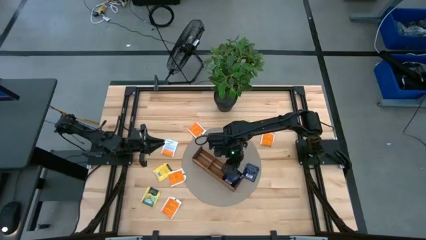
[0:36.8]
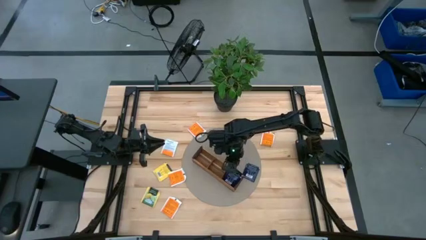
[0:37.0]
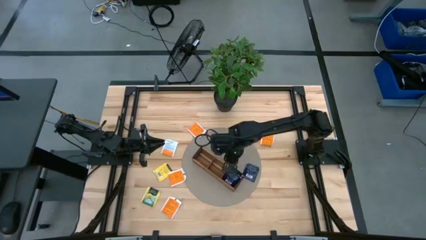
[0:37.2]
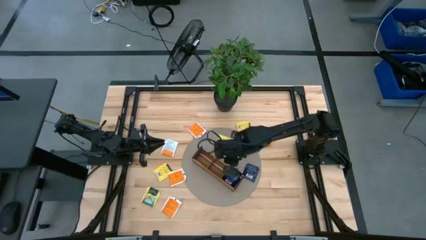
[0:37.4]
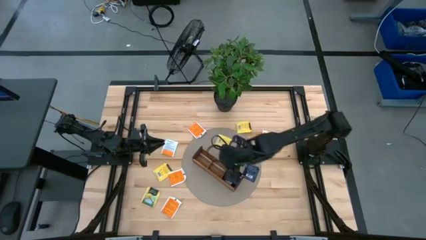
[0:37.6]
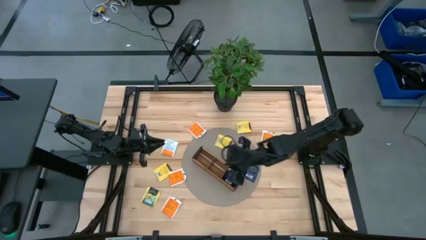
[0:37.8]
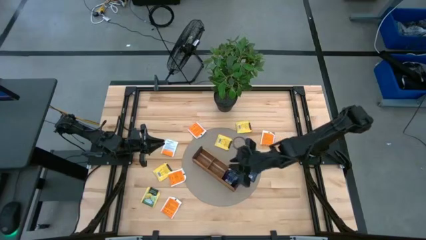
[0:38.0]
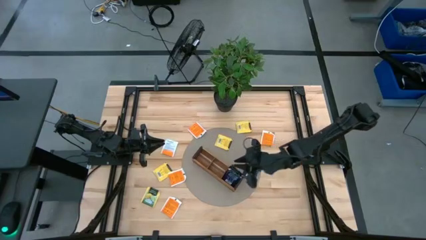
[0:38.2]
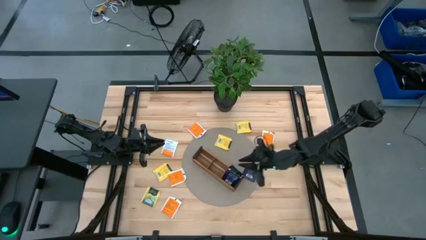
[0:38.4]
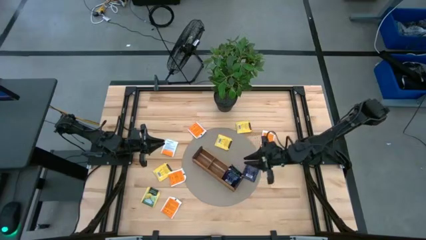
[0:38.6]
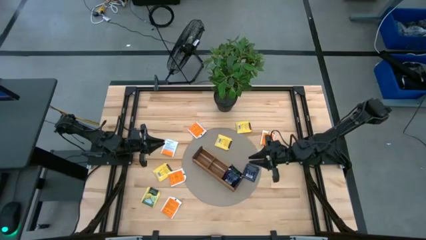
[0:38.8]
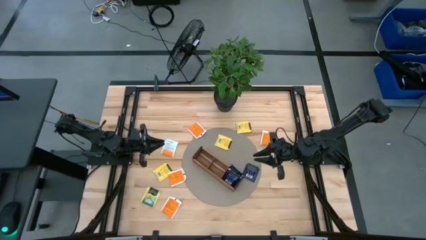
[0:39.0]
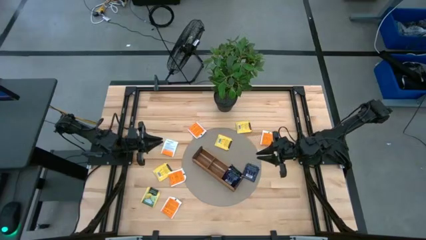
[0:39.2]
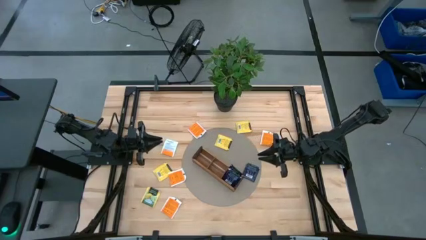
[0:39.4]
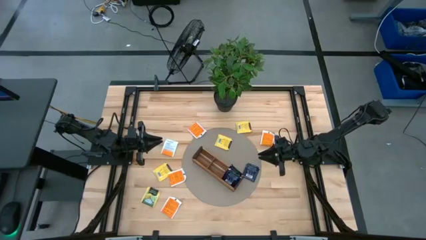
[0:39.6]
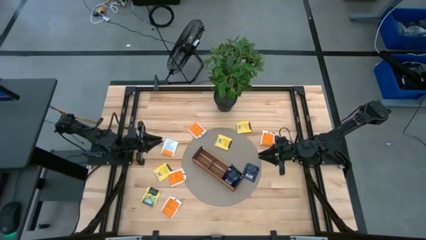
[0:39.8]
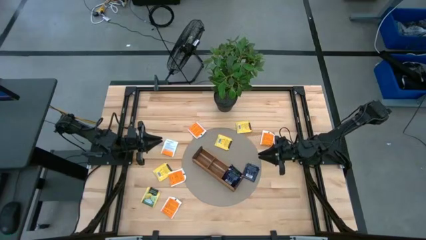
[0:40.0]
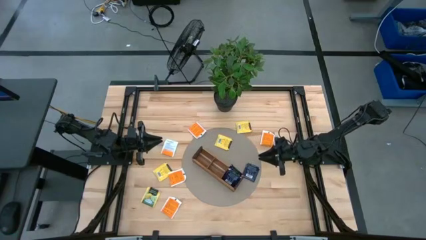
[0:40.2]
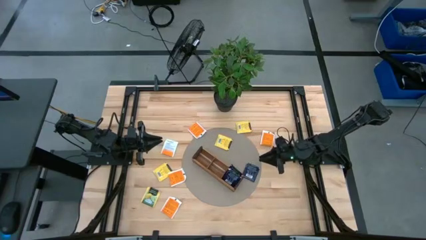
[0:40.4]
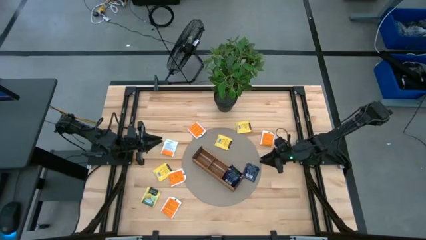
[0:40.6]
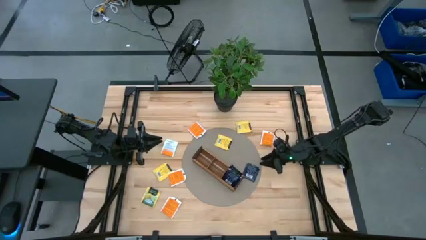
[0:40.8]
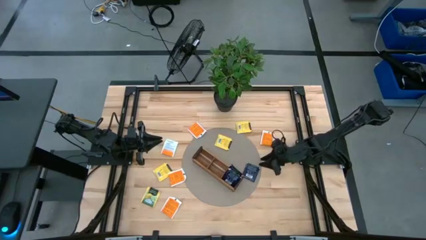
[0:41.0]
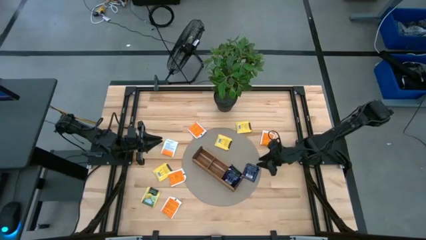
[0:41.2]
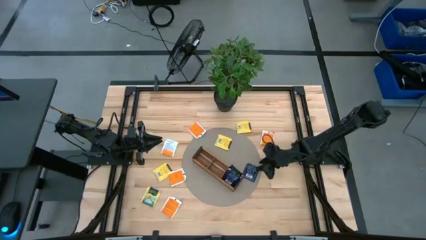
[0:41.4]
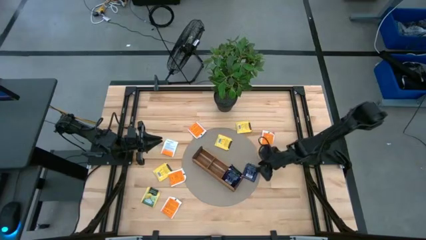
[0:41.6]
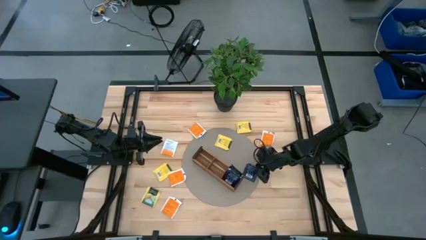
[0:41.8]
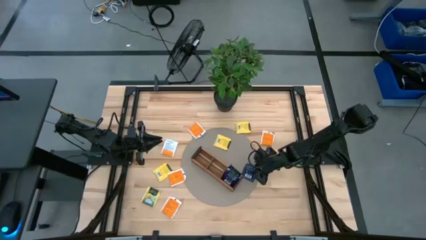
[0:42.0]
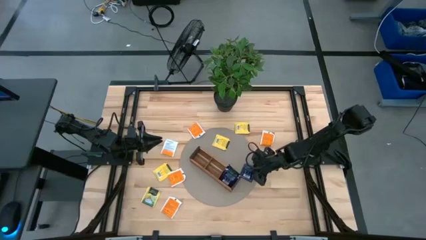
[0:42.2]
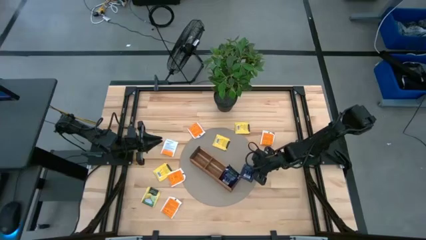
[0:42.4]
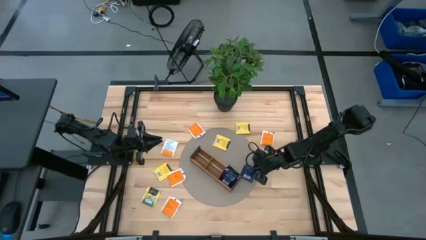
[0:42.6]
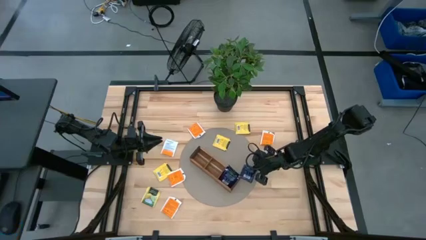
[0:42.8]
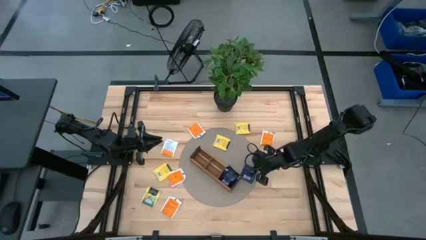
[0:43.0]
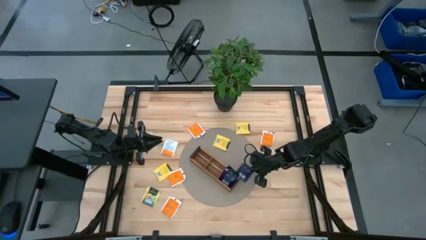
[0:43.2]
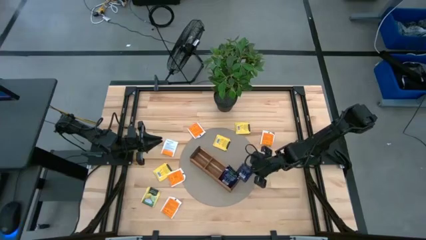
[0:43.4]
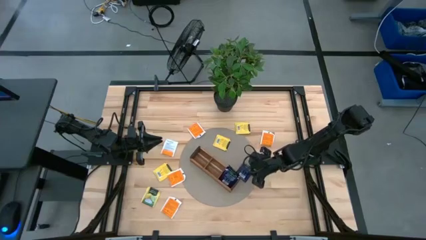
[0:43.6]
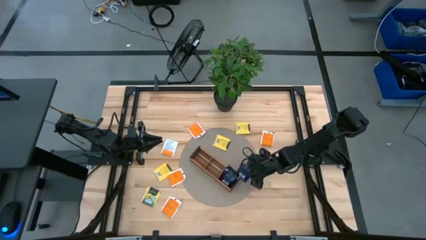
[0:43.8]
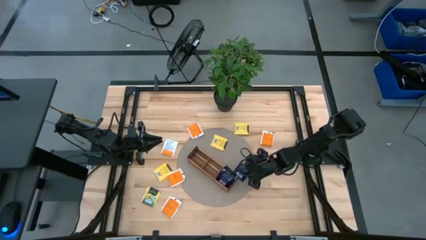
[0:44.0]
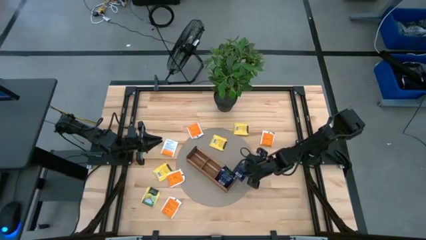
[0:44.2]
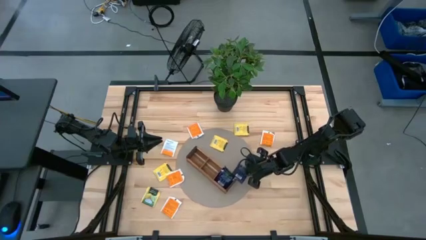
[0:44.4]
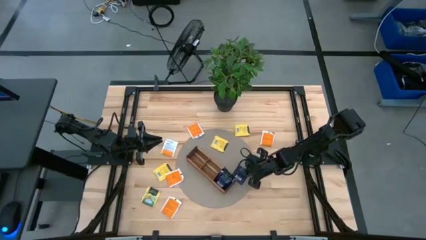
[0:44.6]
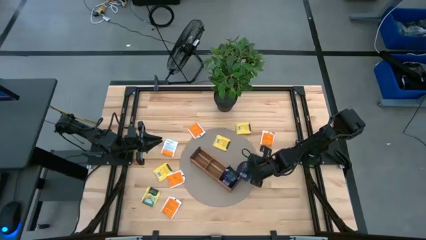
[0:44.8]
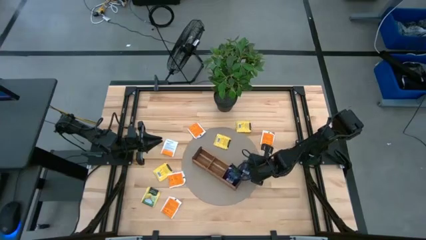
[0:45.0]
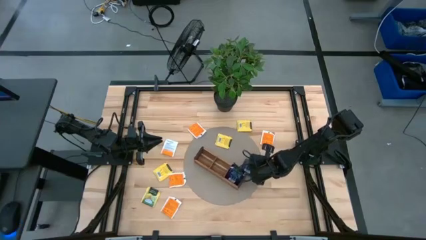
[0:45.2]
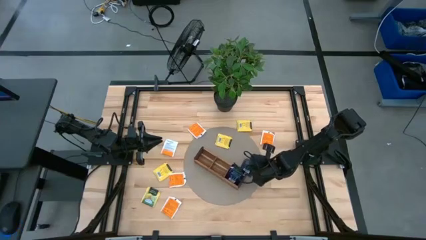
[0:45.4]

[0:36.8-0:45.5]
Task: Pick & Place Tea
Put the black tea bag into the right section of the wooden organizer

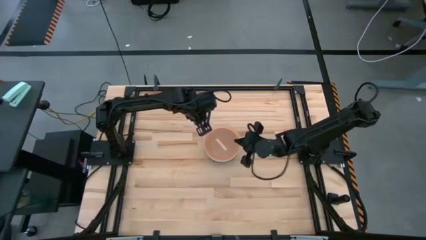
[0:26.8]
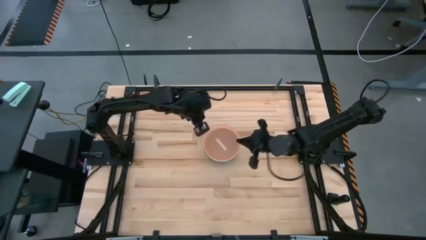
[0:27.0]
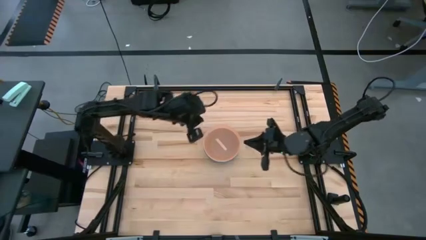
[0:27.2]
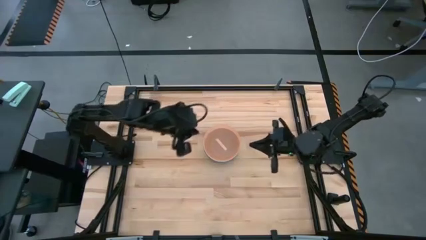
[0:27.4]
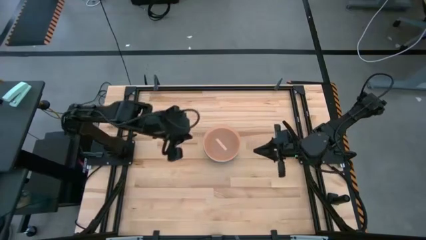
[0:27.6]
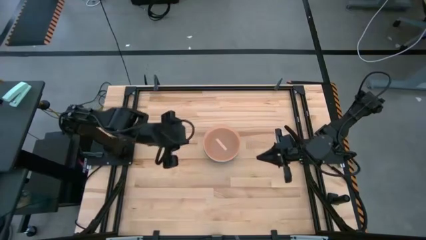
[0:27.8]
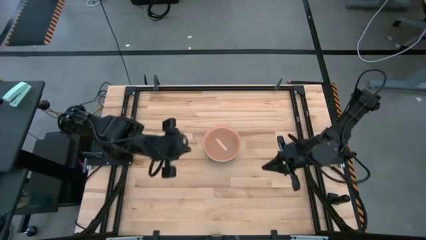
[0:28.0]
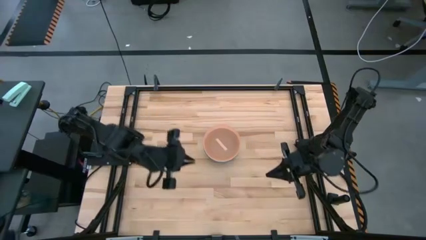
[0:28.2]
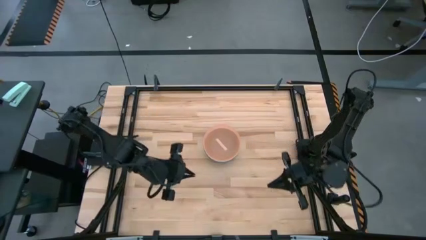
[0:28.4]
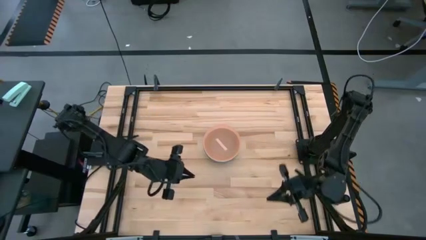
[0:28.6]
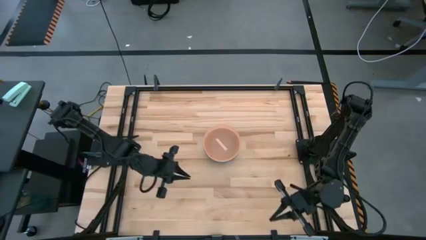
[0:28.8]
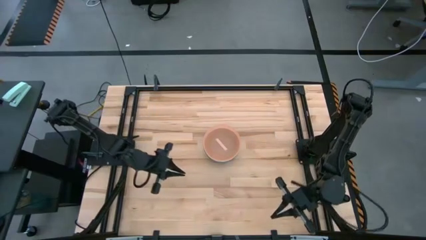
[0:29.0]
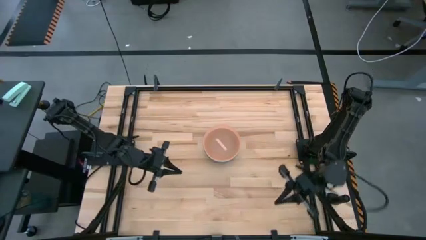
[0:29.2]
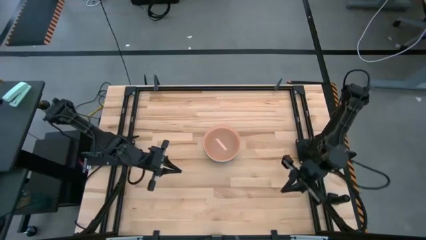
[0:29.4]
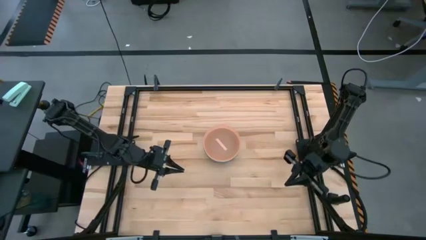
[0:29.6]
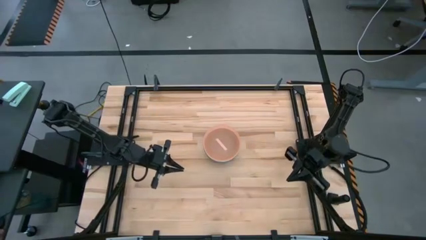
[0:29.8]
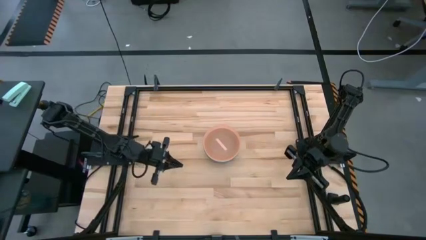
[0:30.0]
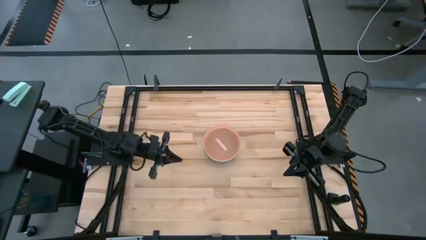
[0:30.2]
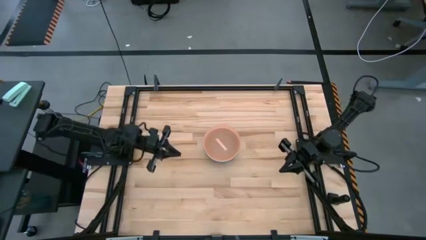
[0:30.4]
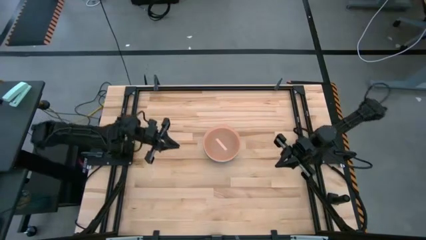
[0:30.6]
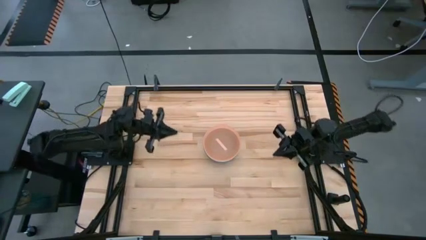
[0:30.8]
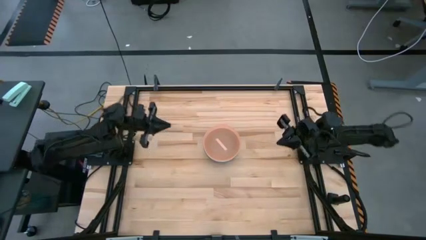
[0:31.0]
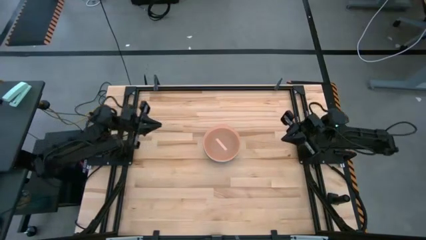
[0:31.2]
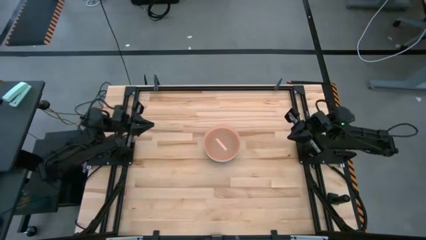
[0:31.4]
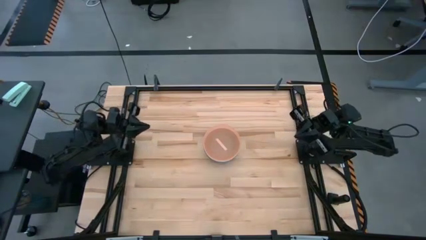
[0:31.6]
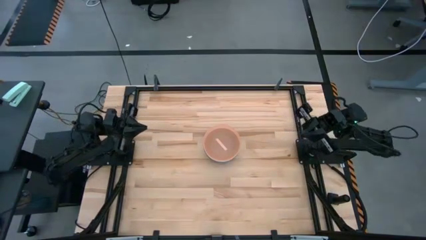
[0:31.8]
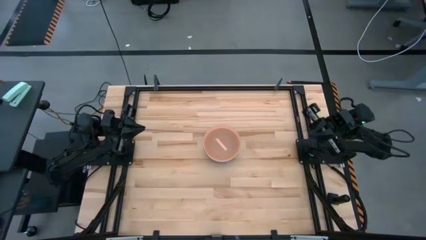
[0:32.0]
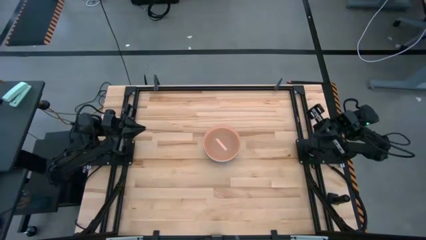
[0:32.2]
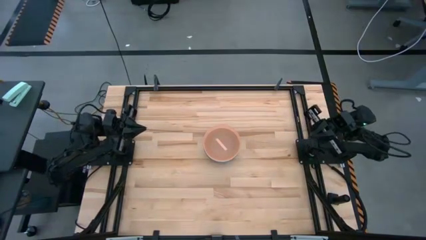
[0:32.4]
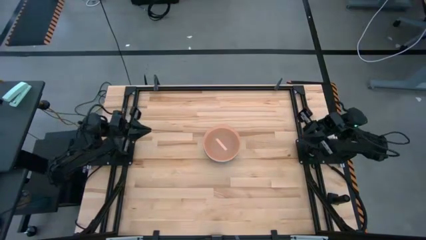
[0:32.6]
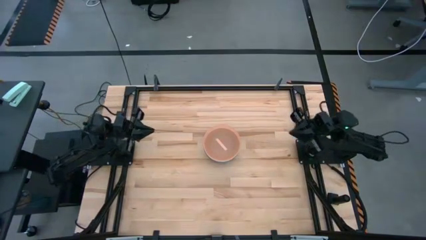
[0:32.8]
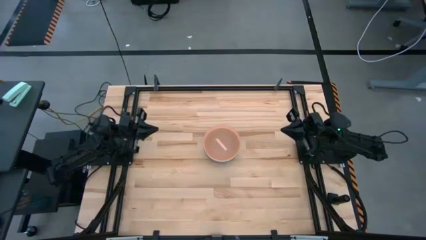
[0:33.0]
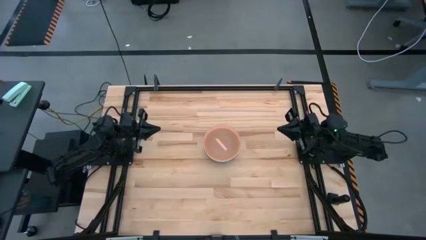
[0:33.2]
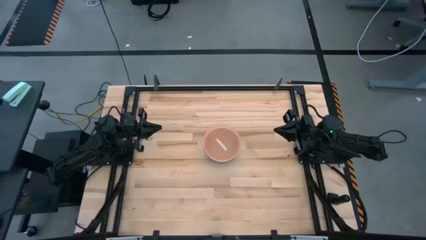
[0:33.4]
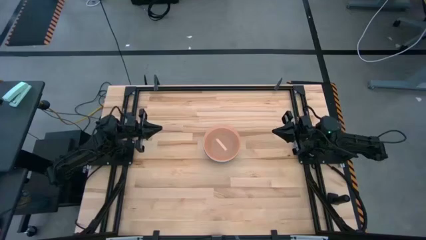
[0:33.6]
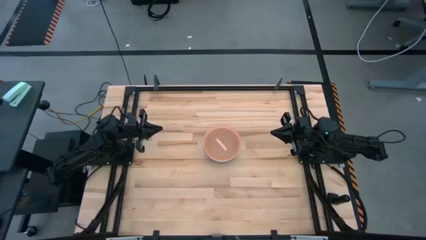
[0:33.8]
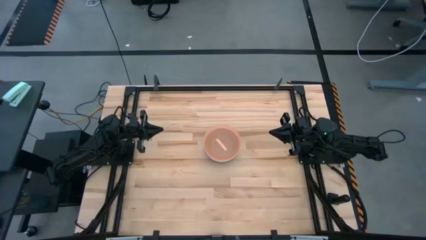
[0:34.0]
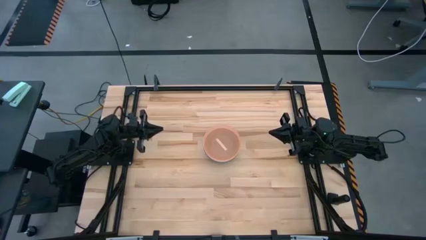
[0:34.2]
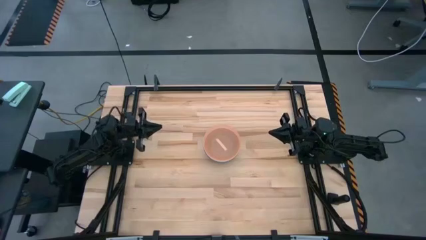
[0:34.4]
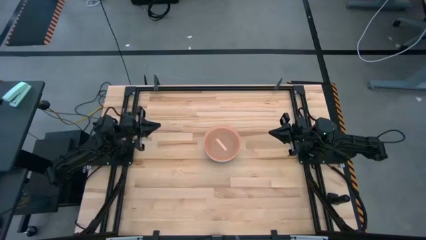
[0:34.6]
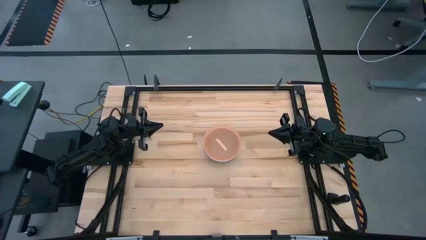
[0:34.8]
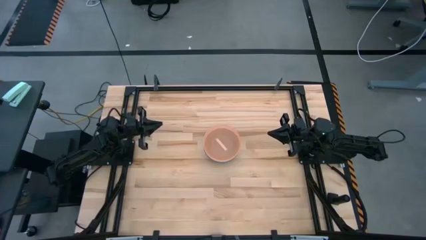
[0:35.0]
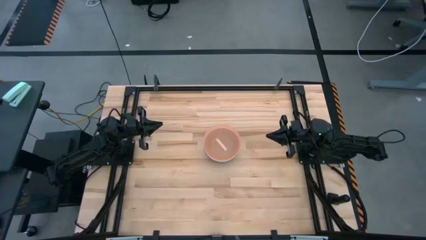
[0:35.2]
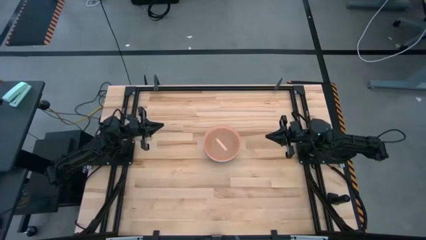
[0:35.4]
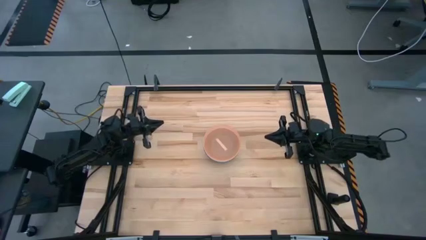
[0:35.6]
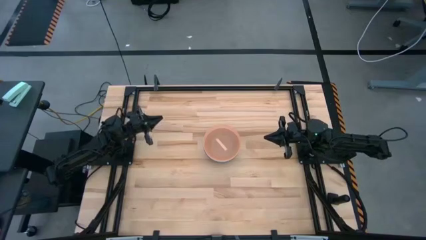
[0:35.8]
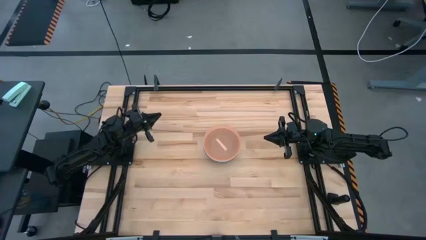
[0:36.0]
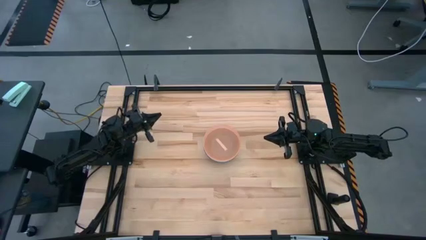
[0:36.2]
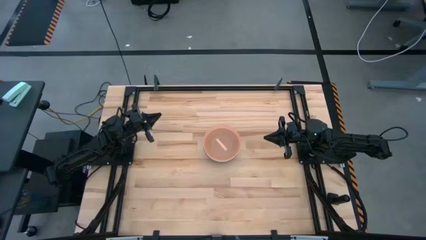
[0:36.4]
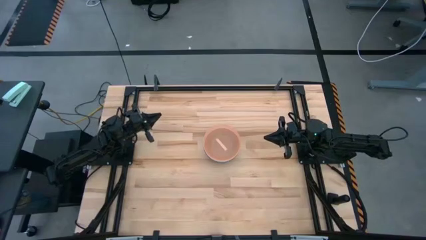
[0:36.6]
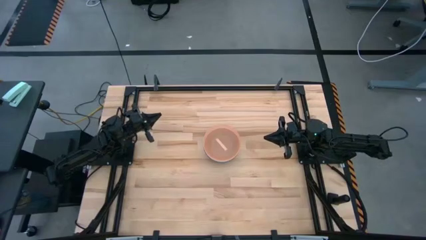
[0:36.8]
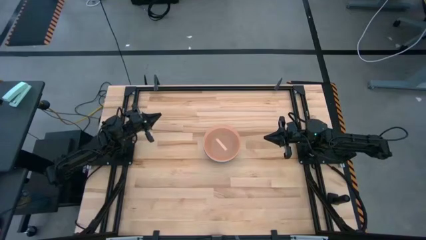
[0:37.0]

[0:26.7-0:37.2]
Task: Nest bowls inside each other
Return to Home Position
